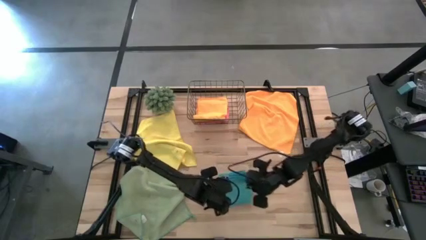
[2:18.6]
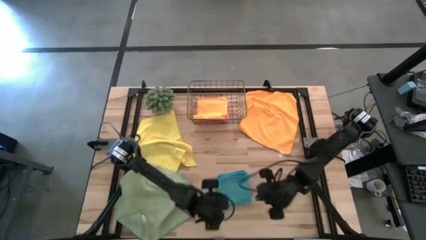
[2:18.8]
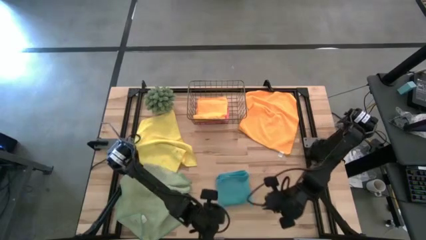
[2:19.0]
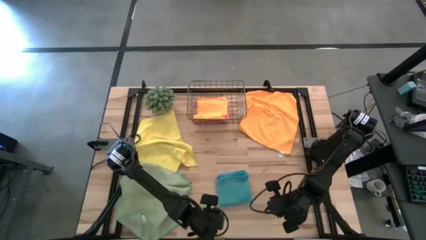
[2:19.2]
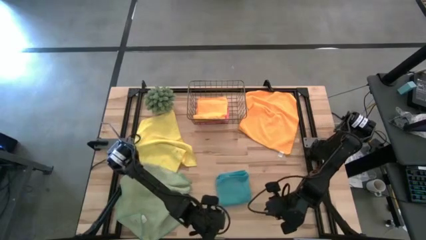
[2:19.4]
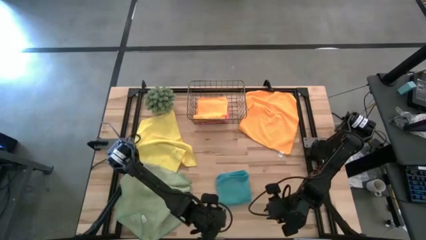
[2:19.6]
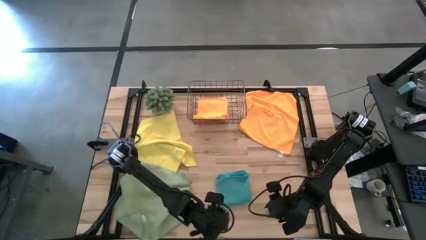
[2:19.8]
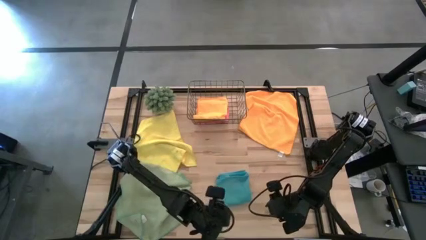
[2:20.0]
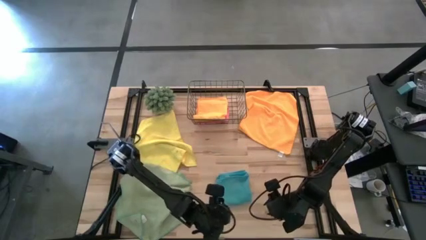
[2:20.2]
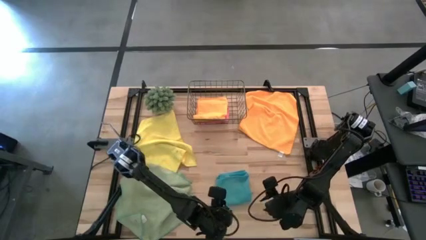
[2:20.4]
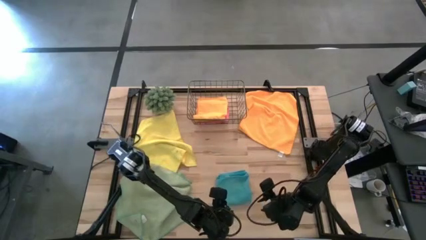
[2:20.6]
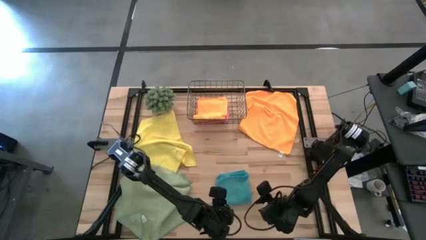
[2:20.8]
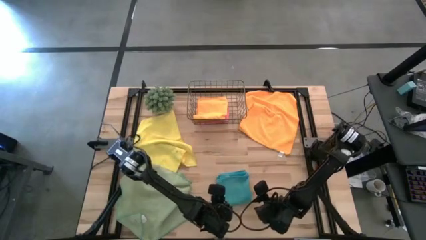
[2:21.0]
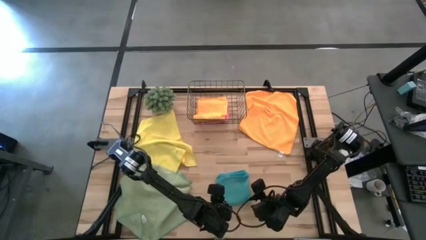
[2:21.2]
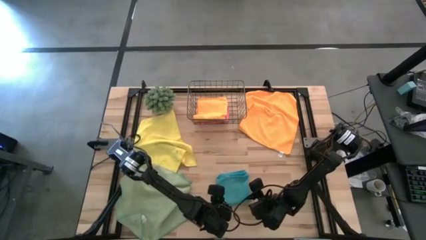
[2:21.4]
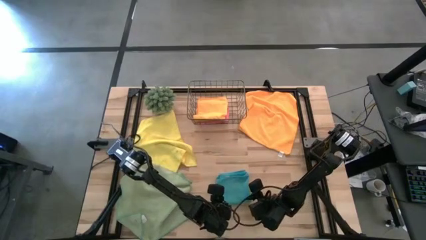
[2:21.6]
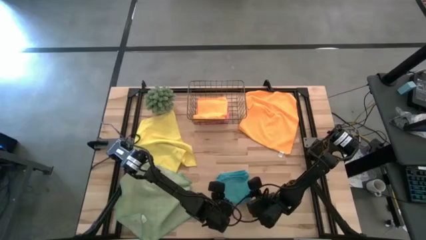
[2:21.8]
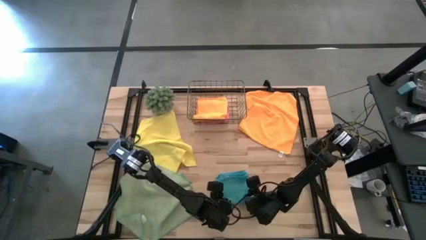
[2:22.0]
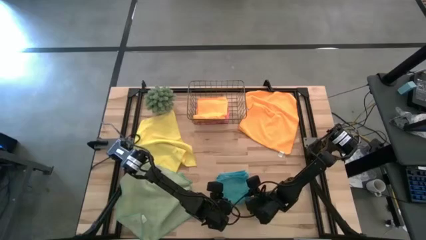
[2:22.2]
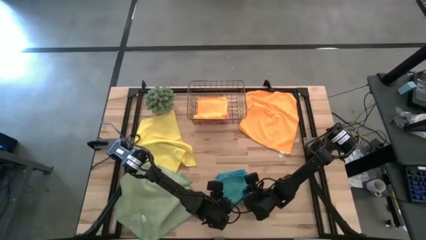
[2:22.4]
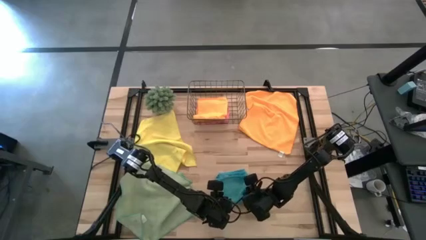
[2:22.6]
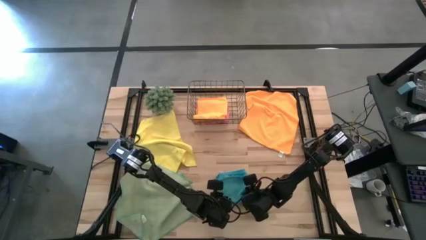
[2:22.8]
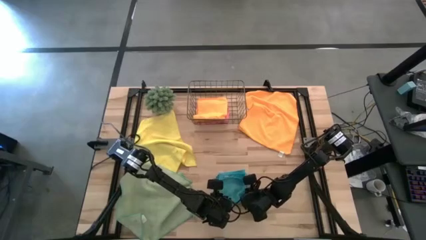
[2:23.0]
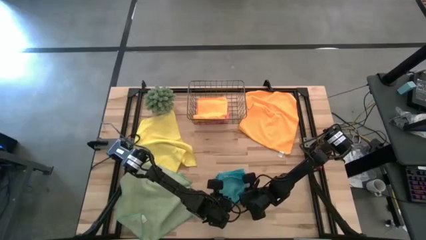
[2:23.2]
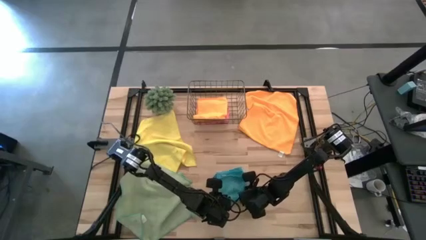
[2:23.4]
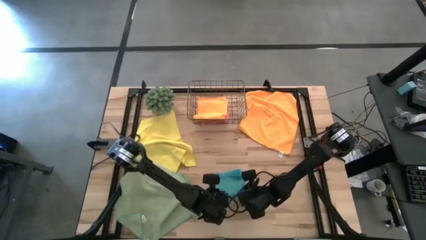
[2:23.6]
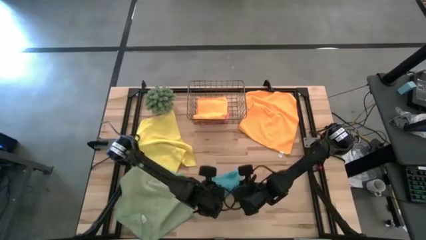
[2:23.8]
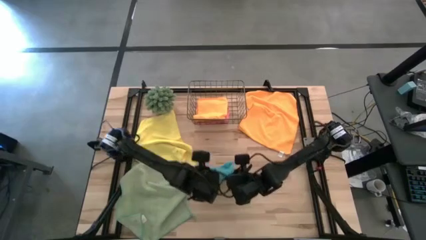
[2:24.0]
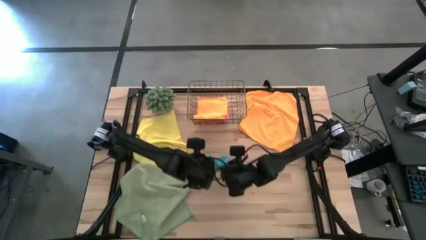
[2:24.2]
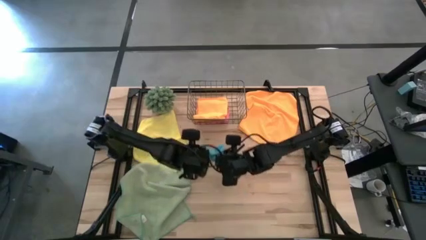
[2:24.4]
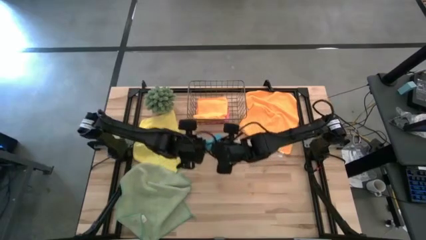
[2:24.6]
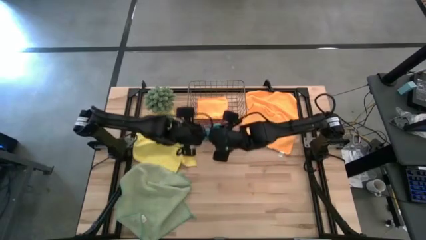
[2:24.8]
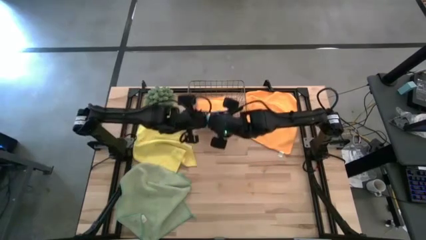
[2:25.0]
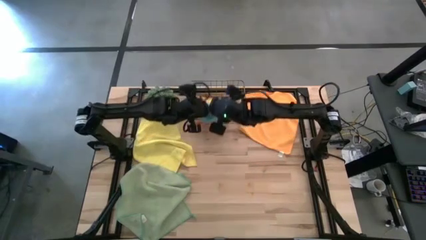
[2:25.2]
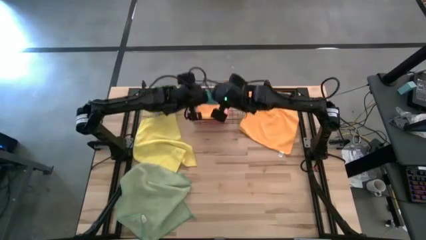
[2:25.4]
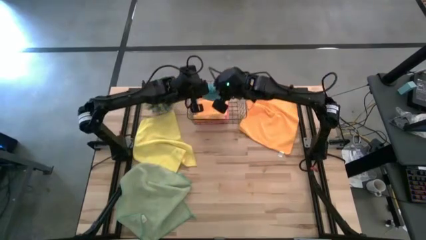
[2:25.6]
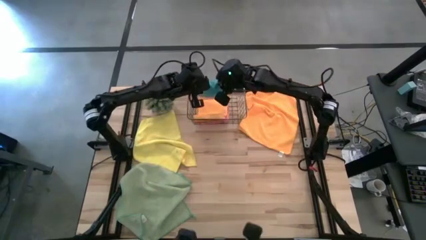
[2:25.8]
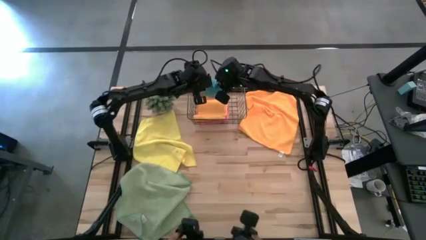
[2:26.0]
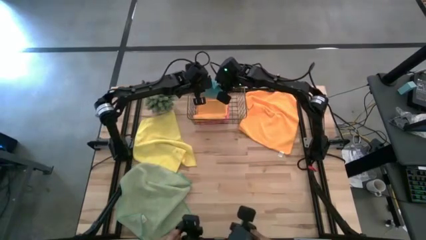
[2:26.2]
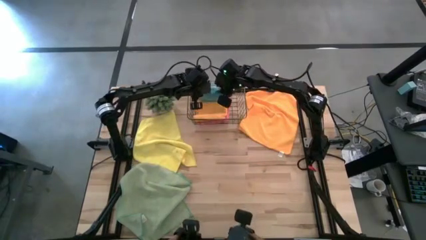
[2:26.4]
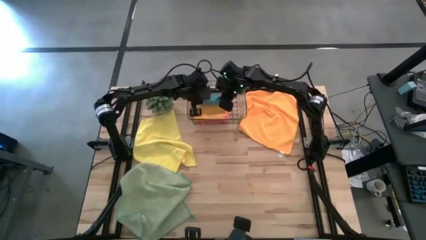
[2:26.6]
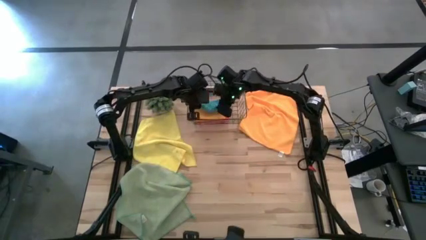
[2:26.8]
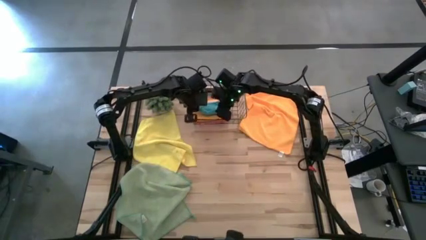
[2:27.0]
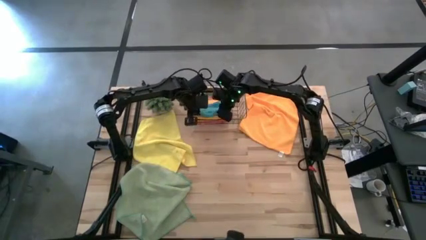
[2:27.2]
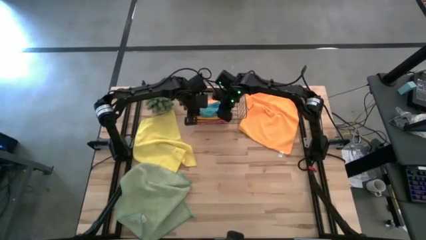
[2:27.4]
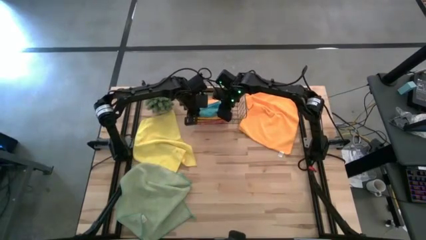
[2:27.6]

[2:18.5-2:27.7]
Task: Fold microfiber towels
Put the folded blue microfiber towel into the wire basket

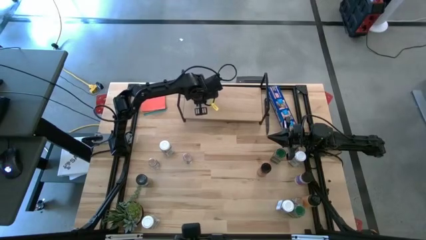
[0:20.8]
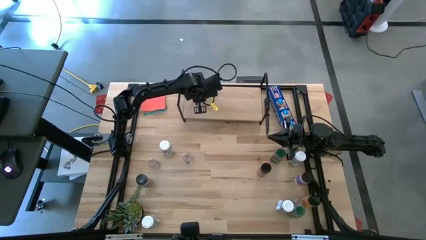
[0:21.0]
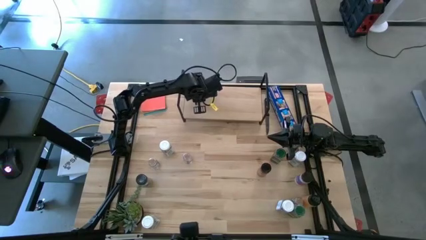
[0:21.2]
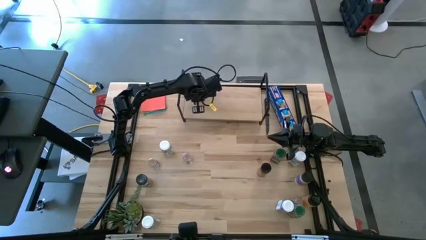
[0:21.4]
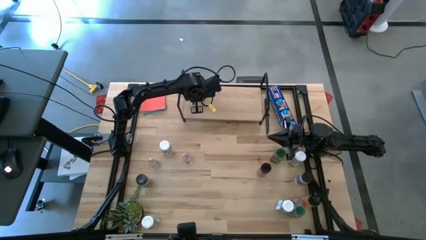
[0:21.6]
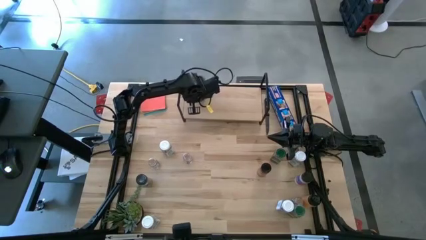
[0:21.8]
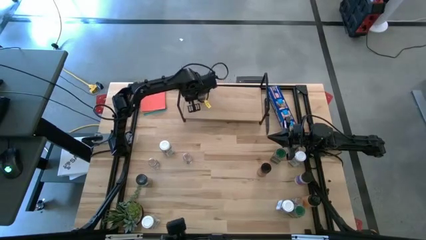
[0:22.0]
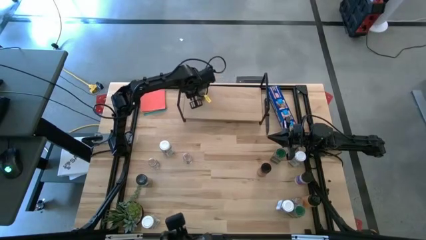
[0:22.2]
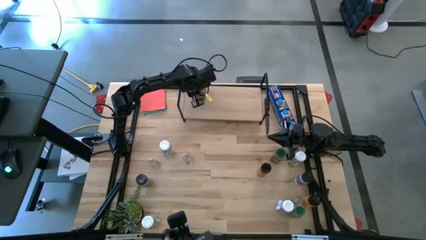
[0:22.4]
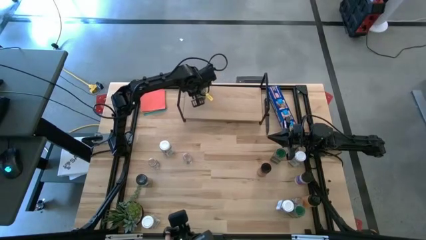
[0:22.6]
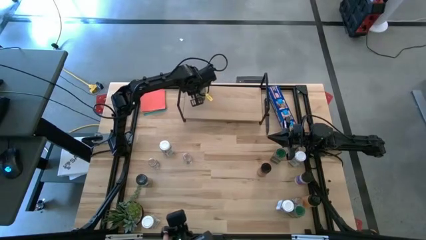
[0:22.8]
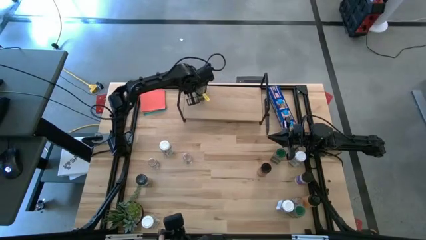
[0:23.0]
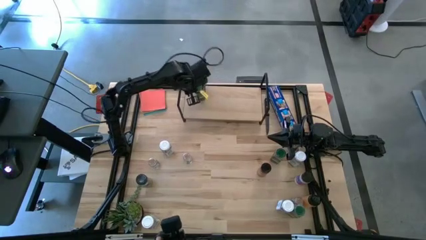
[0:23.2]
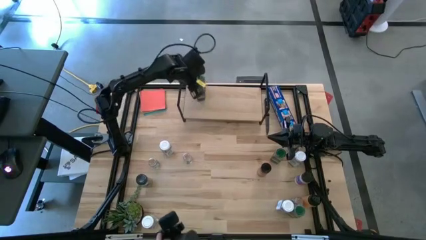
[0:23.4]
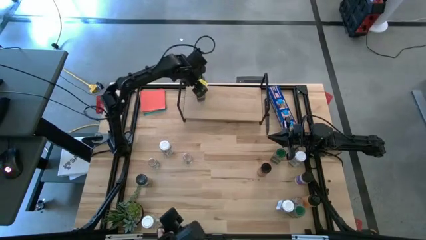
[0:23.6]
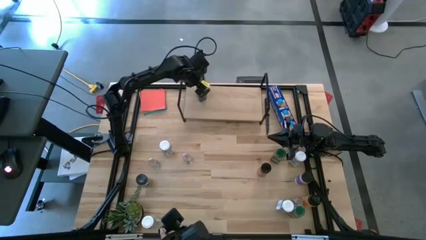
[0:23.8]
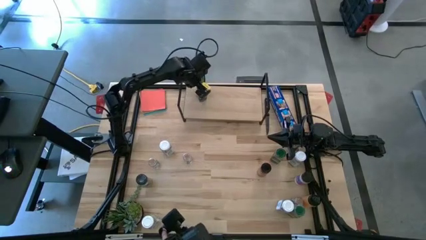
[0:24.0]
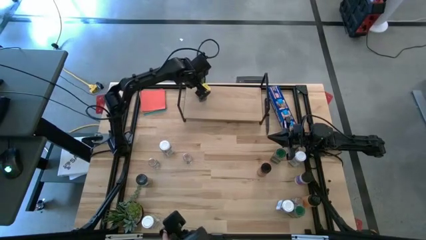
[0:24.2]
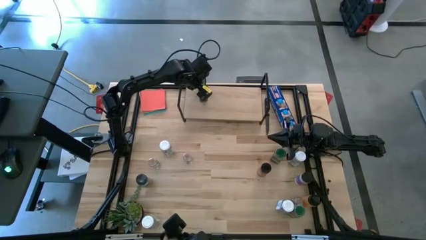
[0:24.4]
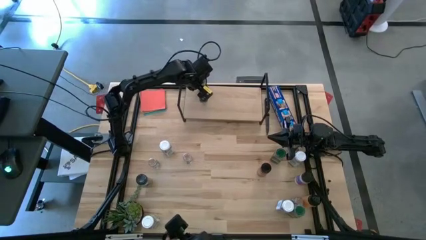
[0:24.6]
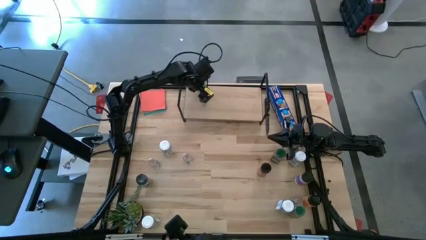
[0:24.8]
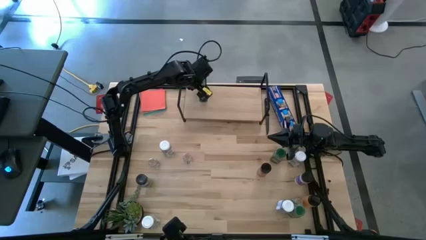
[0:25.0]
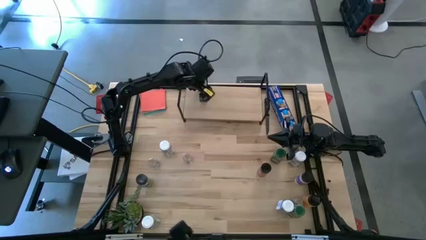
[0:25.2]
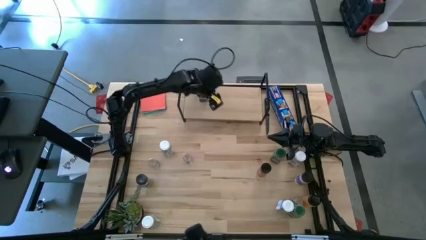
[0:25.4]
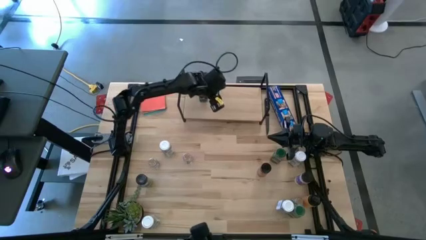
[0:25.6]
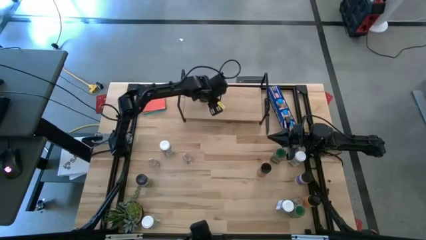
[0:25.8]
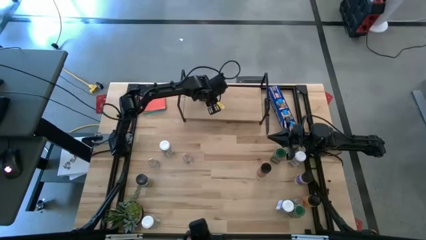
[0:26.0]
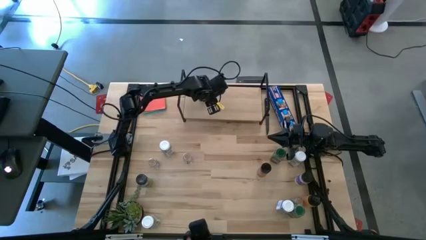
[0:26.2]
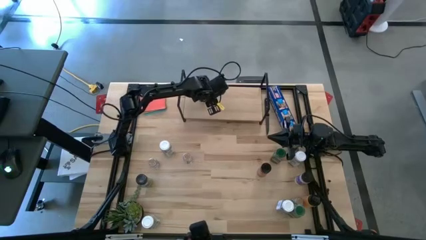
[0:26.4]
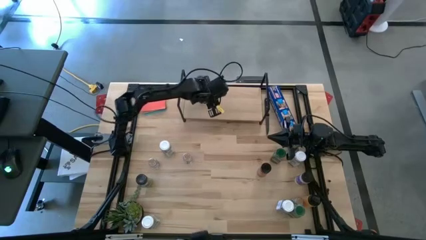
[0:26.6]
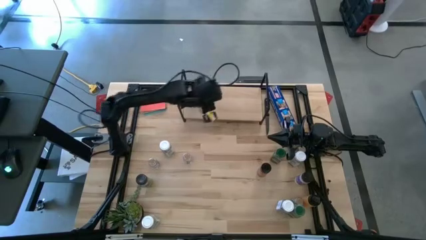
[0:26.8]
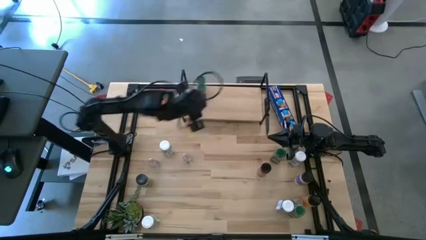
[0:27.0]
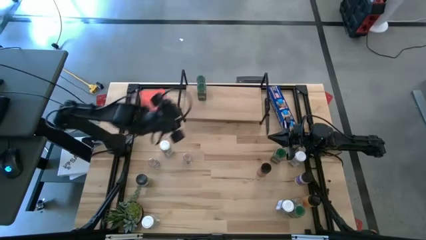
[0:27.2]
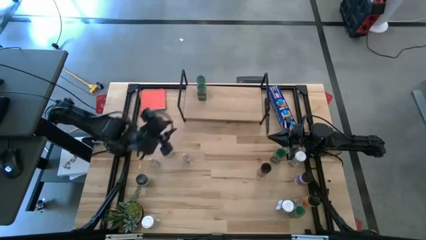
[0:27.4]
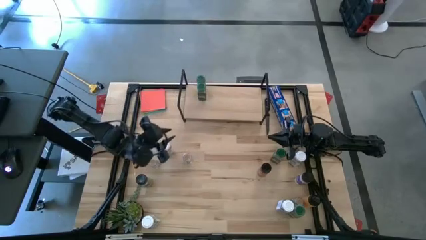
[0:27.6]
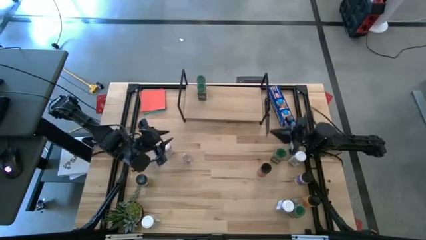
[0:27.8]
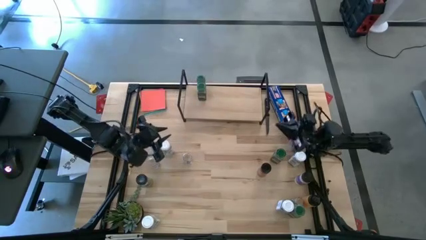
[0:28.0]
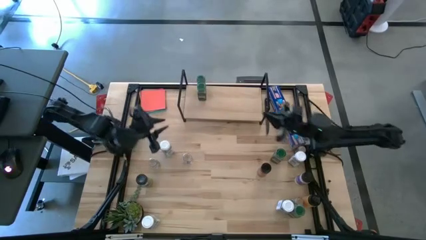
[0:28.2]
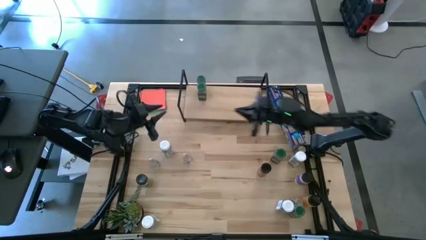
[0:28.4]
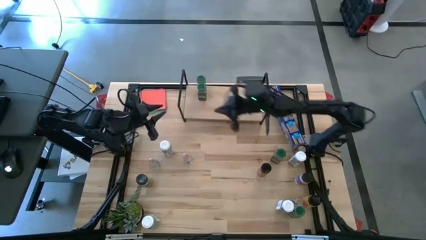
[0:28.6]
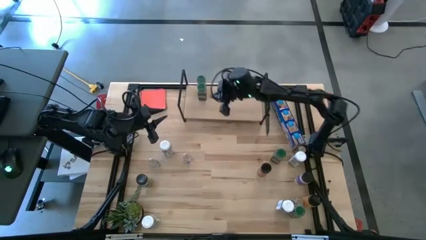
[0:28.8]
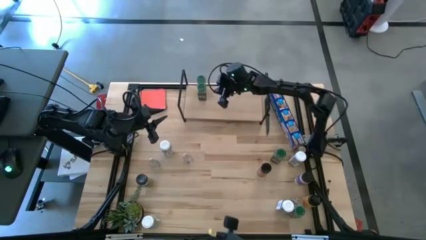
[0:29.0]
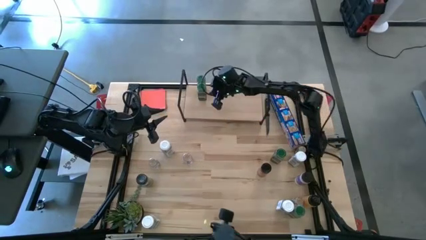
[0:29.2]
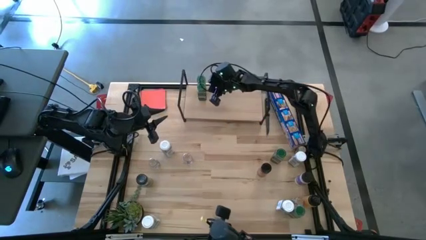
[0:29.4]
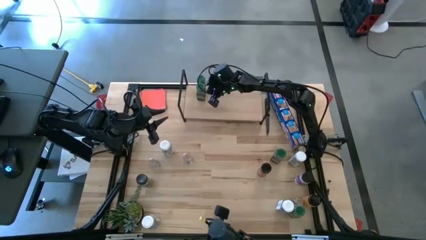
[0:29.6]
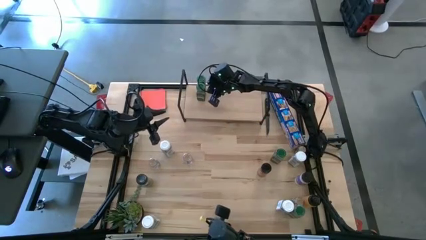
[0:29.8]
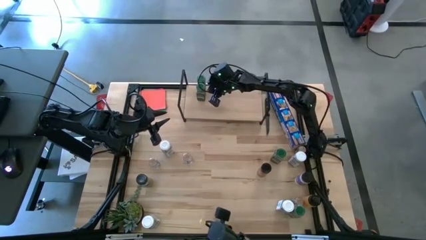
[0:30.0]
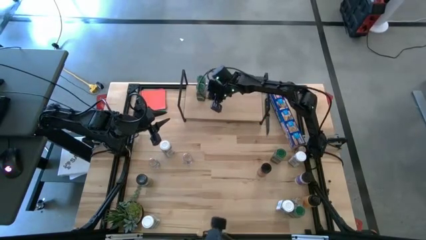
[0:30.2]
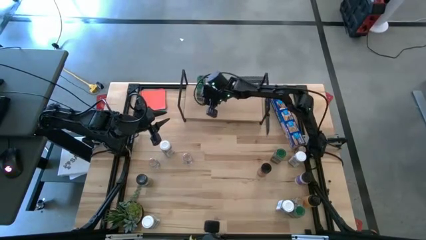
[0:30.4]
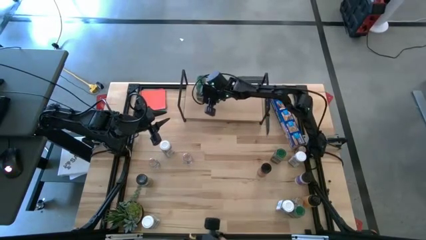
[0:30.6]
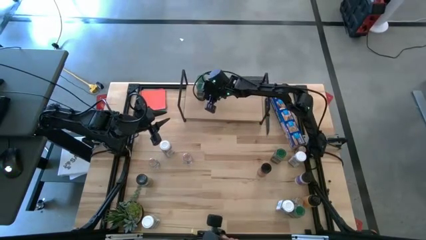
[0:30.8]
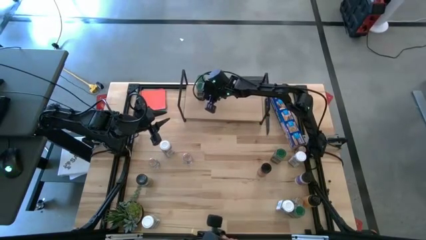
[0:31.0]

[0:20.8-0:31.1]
Task: Shelf spices
Put the bottom left green seasoning bottle on the shelf aligned with the other green seasoning bottle
